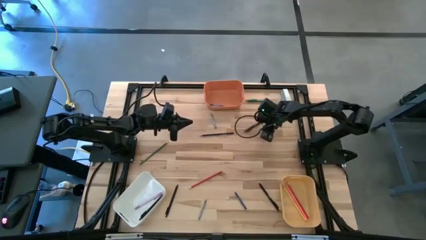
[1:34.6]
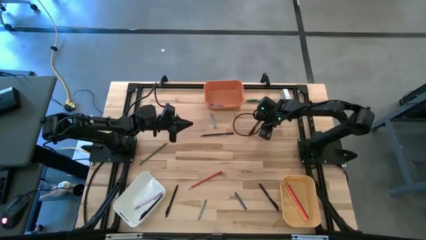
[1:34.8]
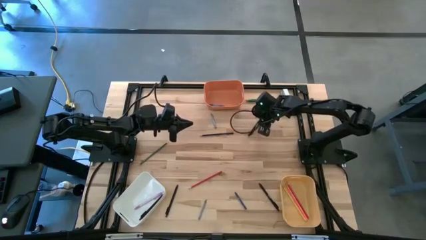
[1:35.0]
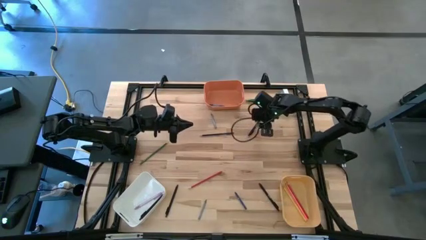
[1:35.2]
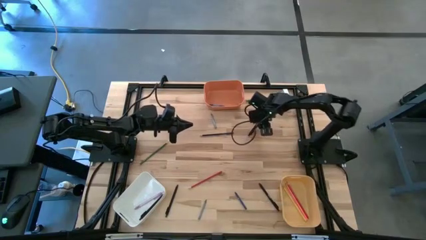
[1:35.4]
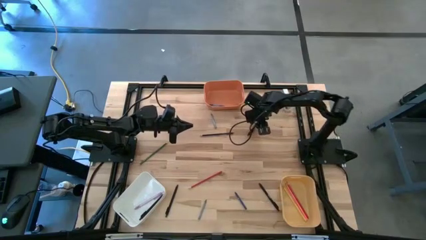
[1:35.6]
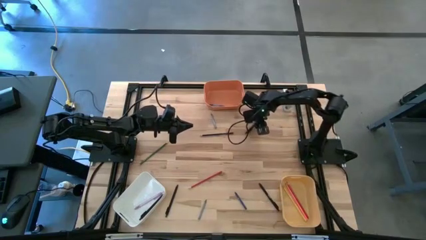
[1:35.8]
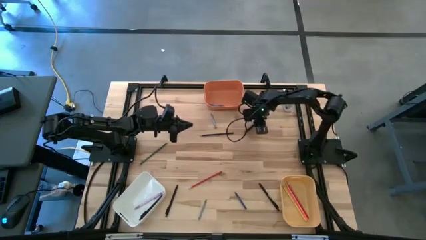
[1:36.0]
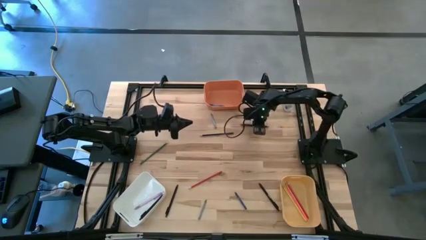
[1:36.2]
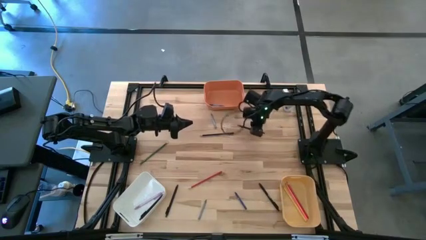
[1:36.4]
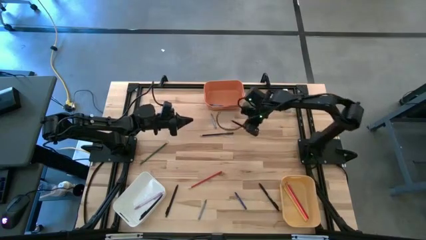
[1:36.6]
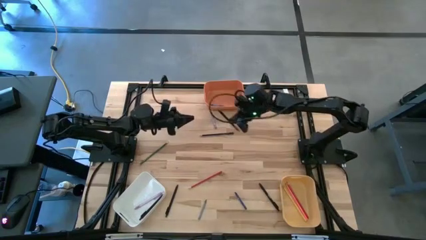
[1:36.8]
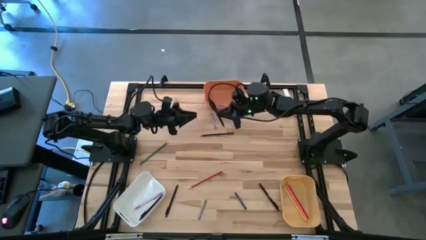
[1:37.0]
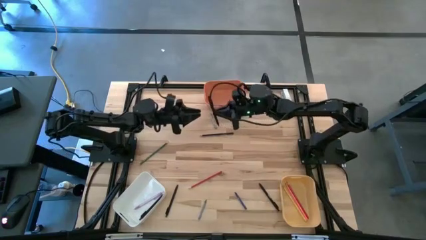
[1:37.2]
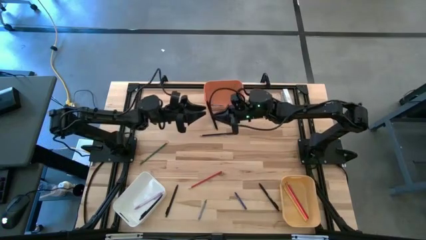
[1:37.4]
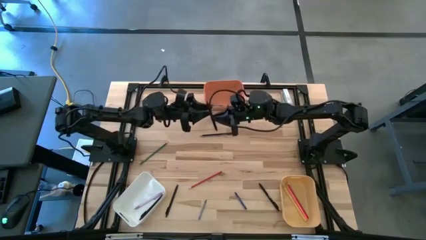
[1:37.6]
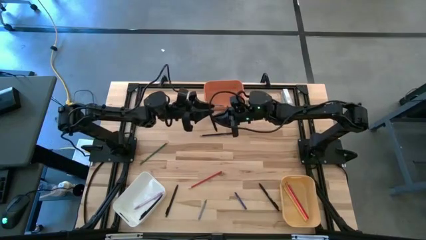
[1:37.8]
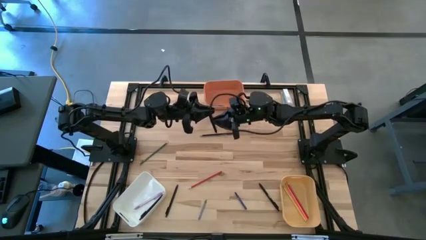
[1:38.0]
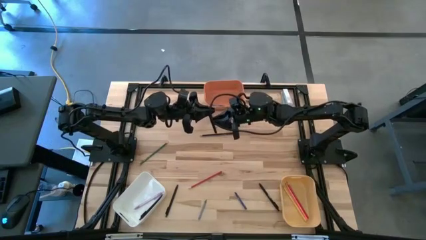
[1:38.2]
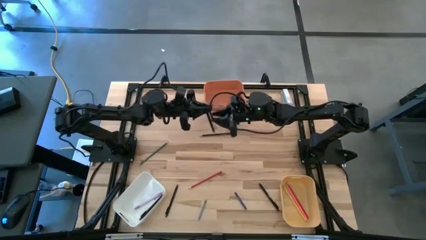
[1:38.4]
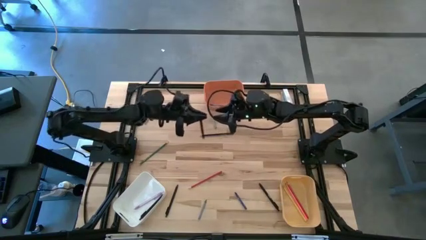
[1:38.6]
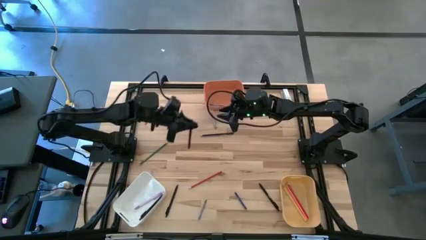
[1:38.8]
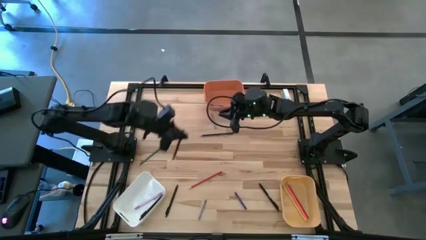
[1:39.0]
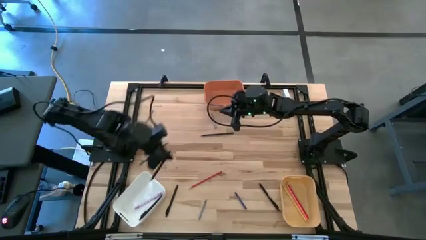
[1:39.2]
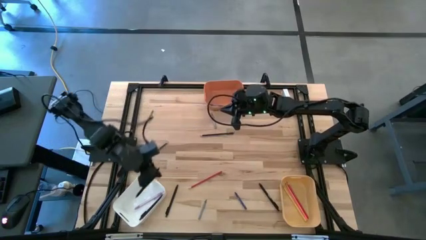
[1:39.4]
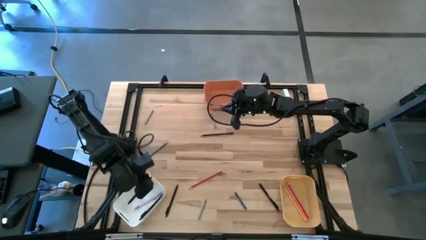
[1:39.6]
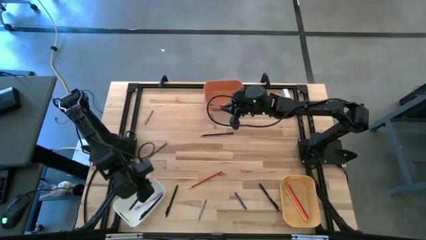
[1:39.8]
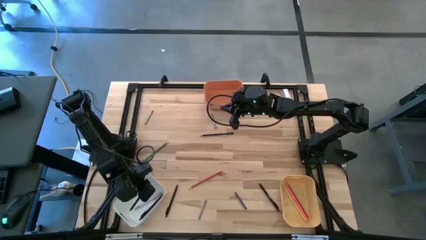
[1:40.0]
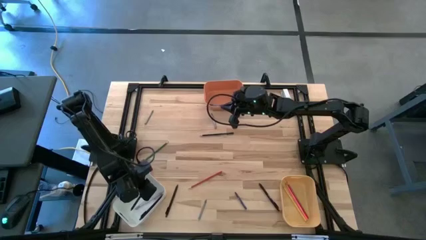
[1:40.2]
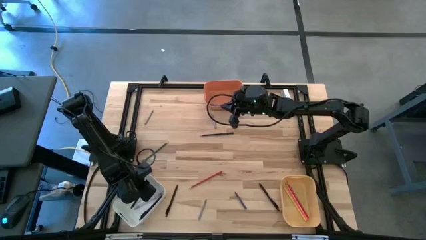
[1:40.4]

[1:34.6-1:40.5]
Task: Sort crayons/erasers/pens/pencils in bins
Put the black pen into the white bin

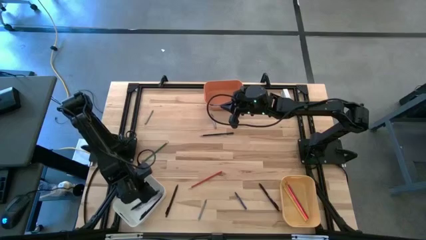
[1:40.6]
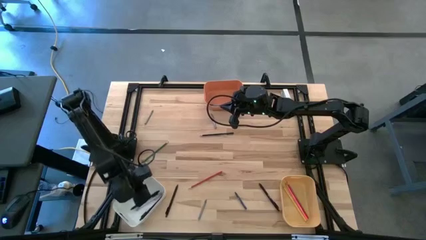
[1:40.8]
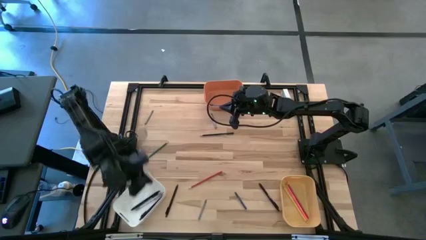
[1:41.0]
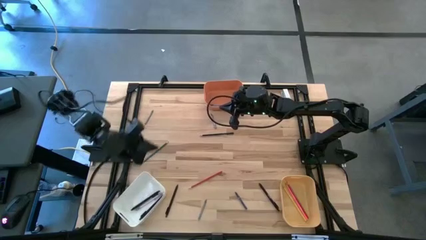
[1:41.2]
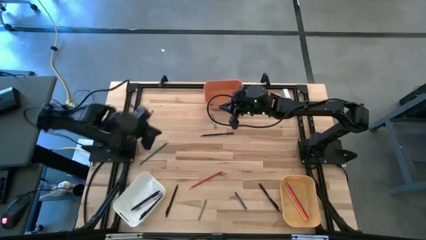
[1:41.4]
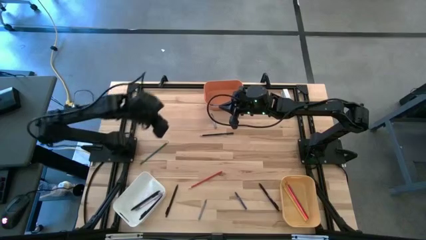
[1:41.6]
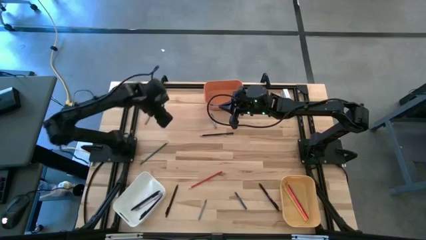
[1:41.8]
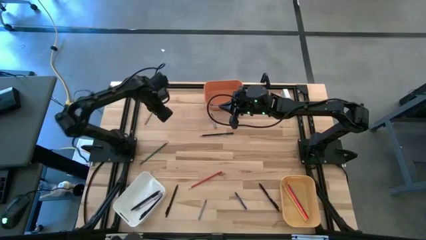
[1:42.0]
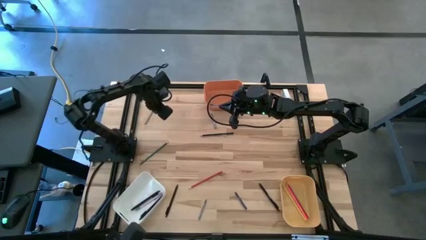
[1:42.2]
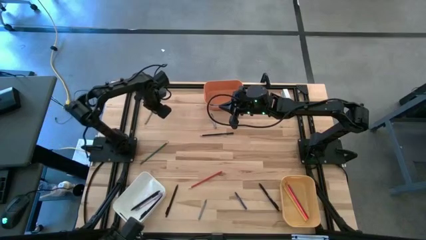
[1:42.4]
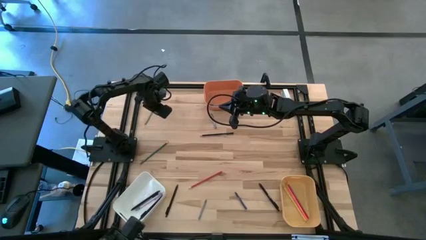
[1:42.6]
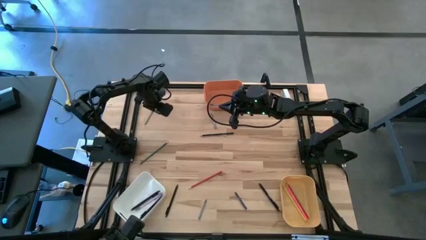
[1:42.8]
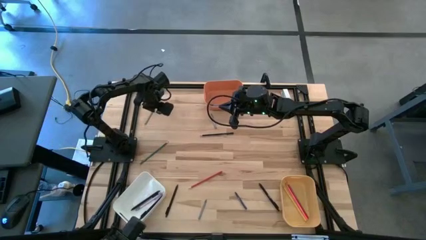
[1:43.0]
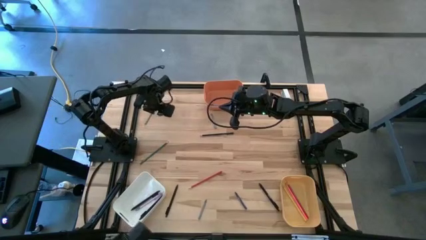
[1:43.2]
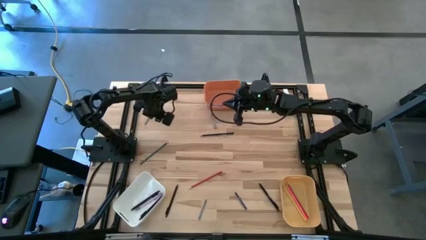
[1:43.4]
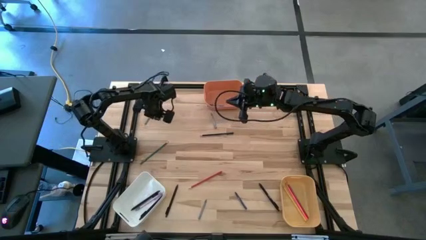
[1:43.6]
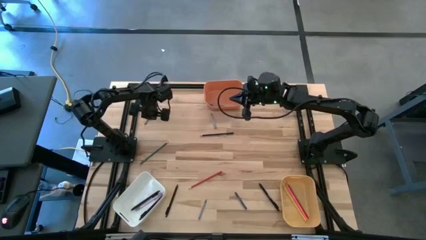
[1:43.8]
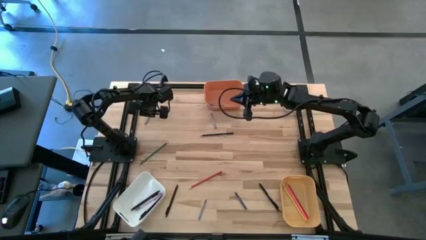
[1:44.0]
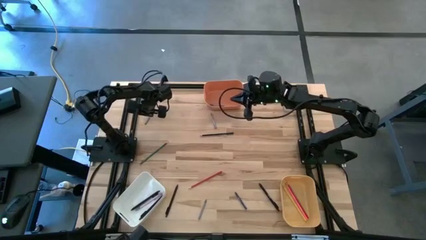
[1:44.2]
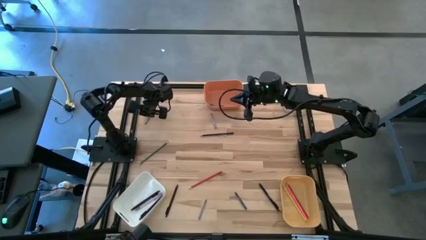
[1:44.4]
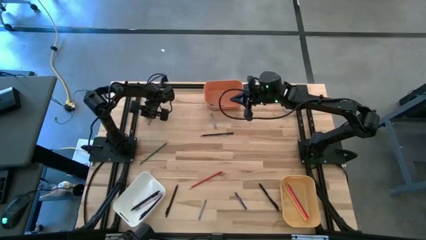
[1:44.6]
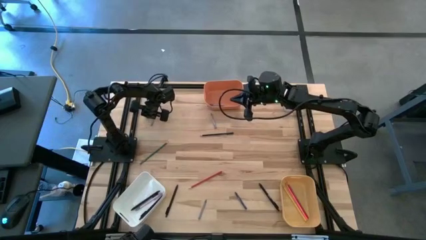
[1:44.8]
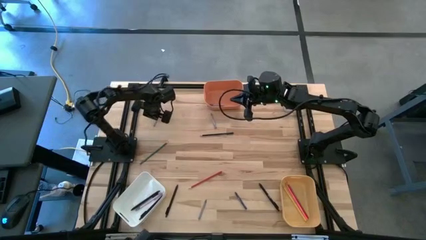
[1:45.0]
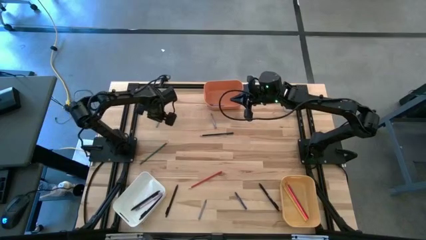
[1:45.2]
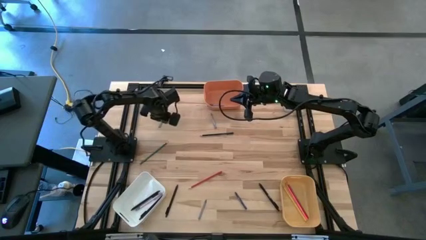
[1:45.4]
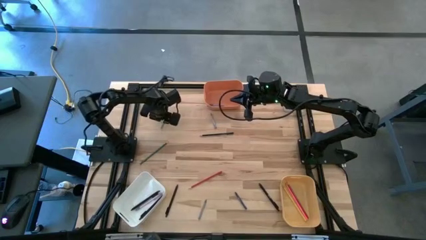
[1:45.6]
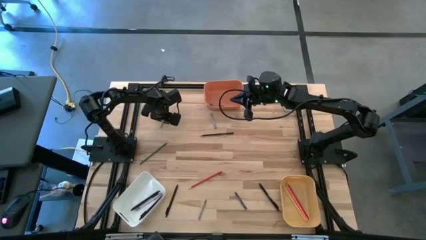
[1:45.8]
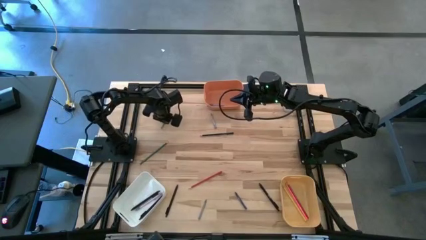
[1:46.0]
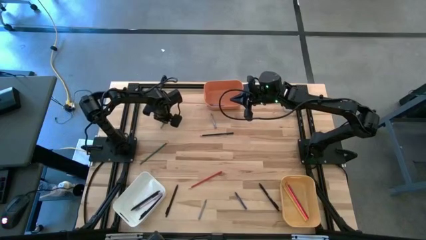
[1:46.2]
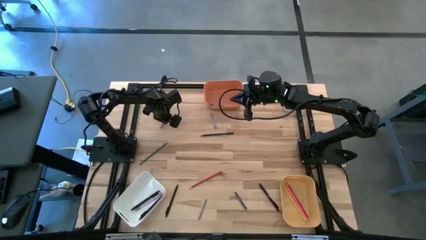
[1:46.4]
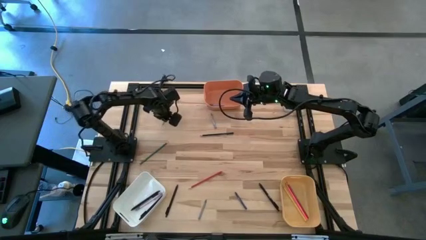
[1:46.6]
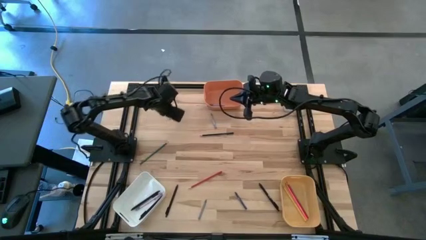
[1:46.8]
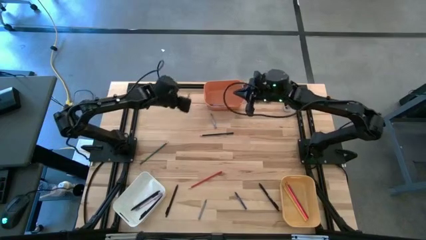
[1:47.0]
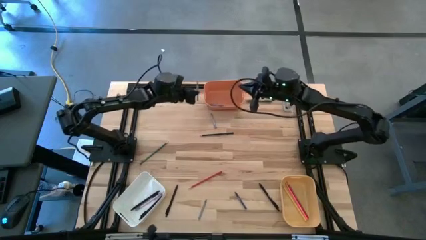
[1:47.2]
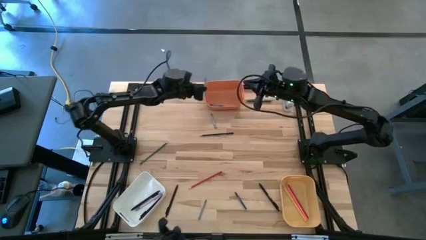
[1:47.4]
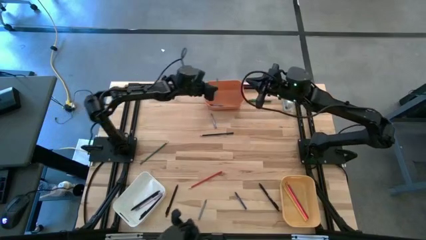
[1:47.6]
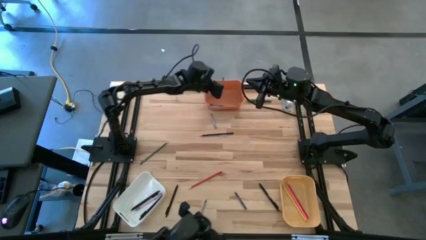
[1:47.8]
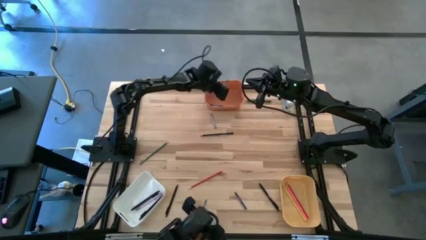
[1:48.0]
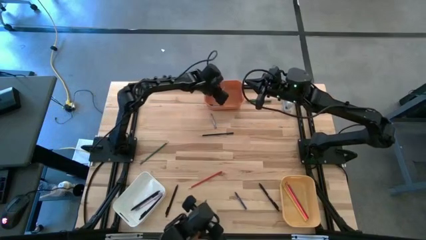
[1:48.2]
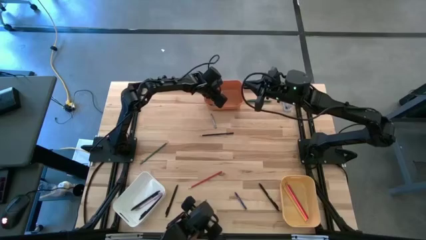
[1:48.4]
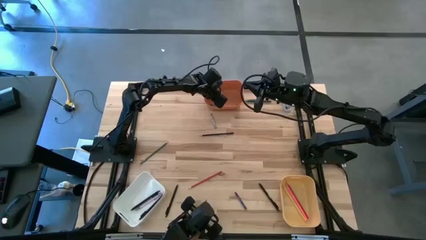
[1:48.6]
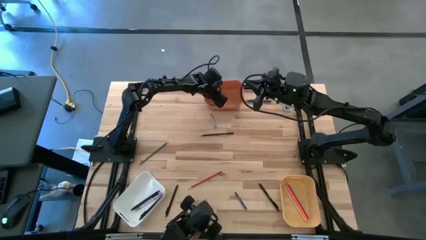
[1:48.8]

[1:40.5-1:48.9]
Put the gray crayon into the orange bin
